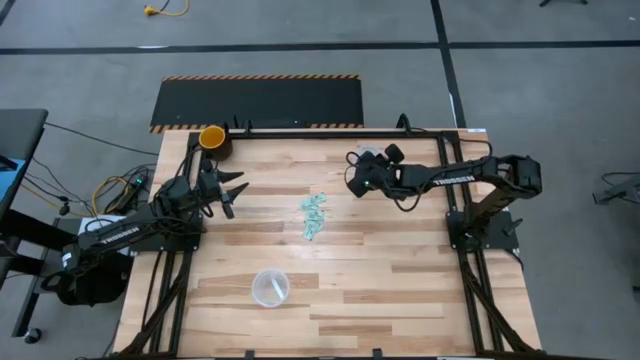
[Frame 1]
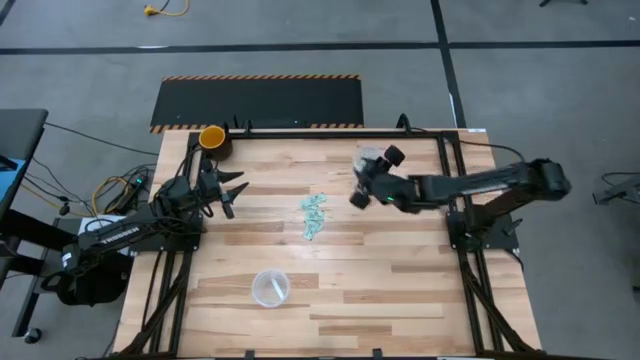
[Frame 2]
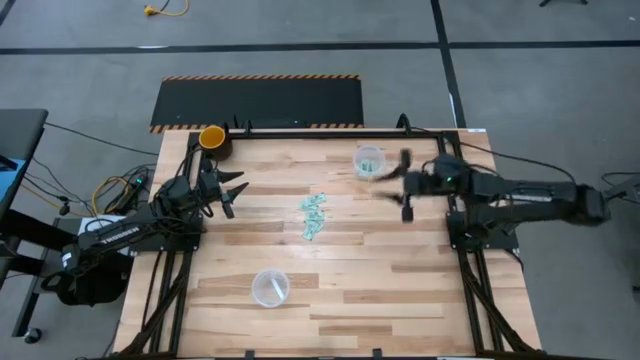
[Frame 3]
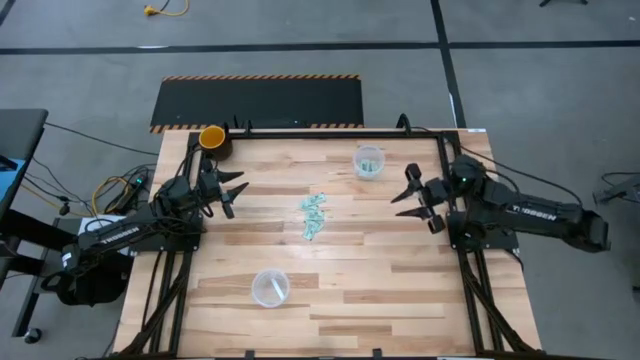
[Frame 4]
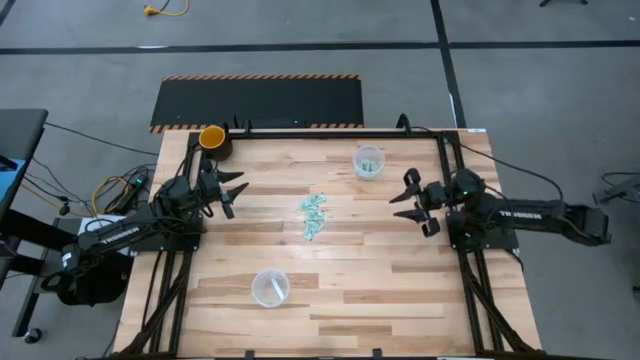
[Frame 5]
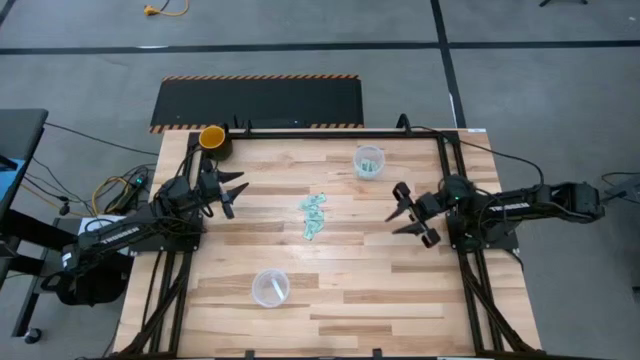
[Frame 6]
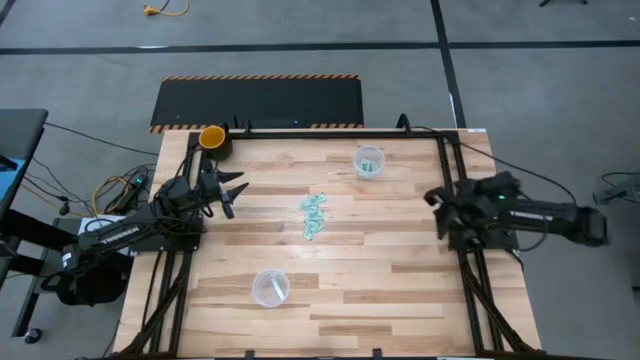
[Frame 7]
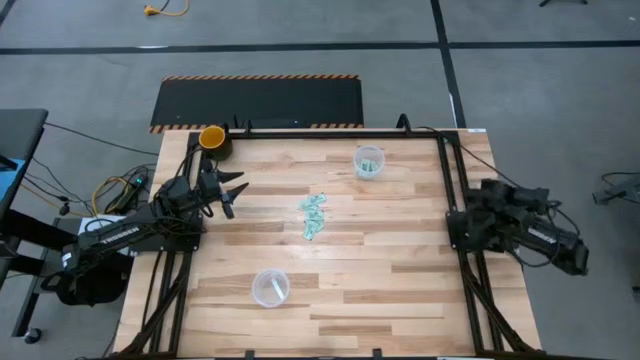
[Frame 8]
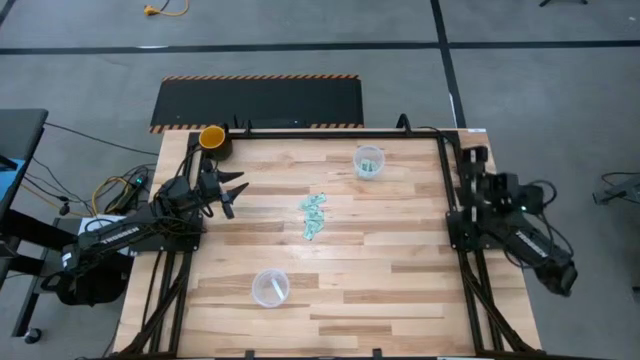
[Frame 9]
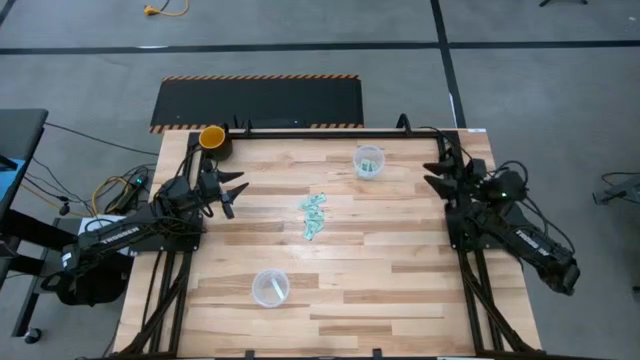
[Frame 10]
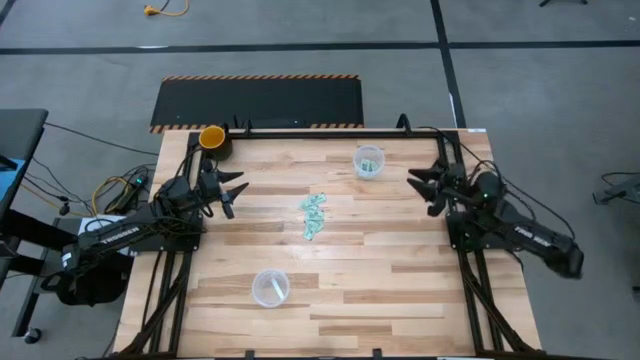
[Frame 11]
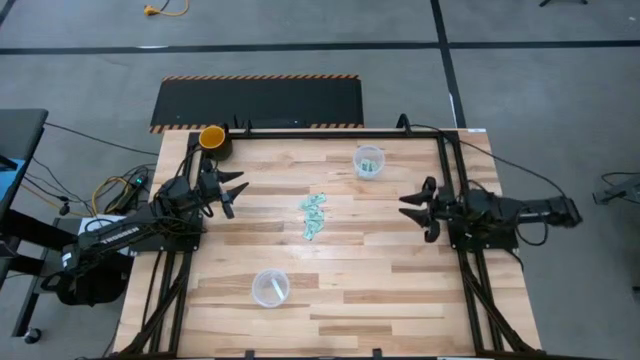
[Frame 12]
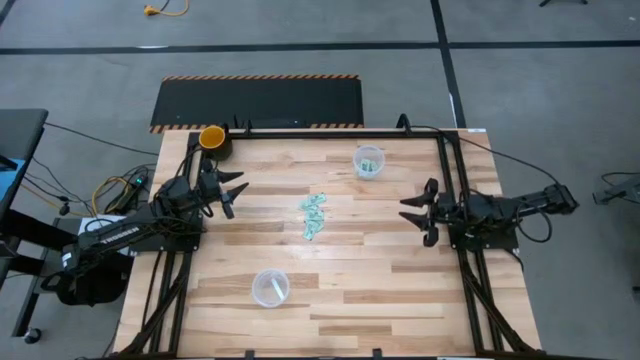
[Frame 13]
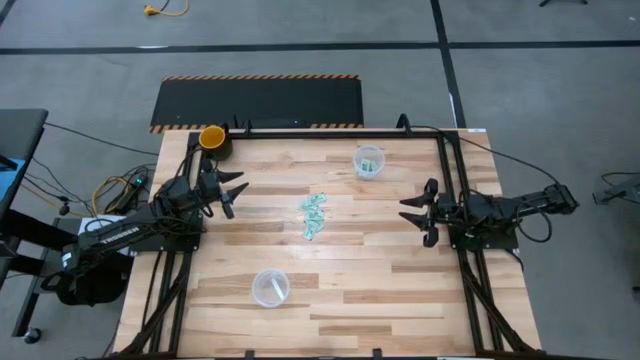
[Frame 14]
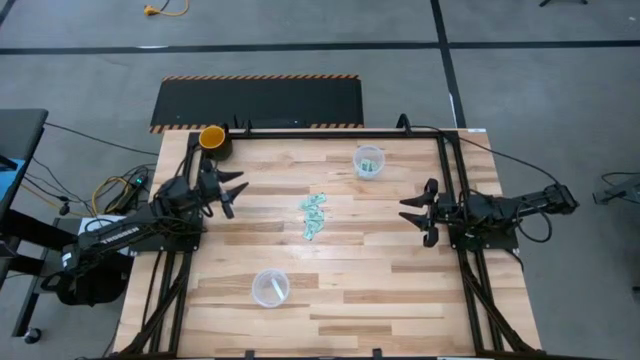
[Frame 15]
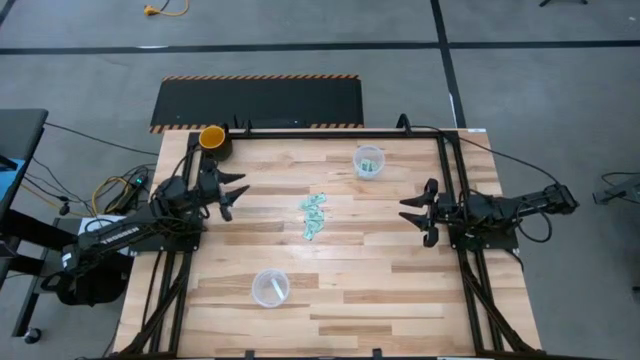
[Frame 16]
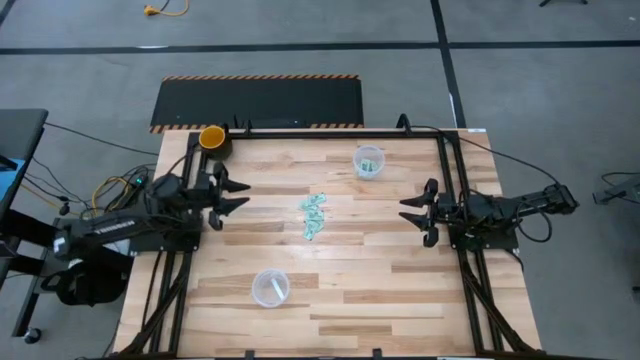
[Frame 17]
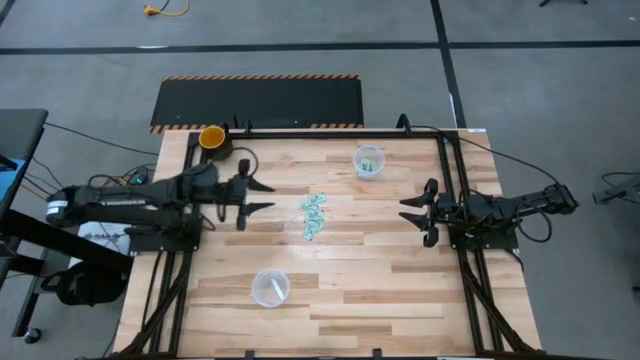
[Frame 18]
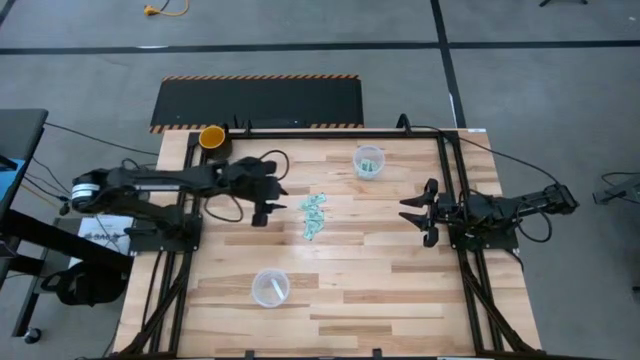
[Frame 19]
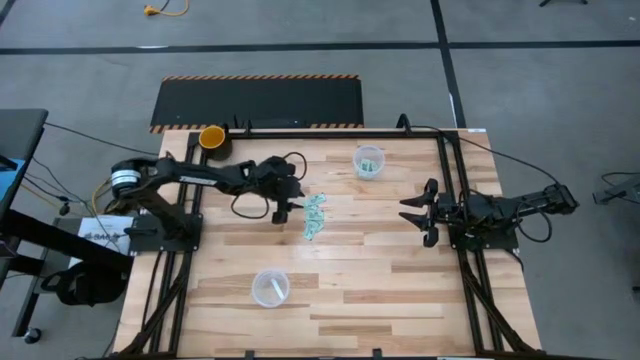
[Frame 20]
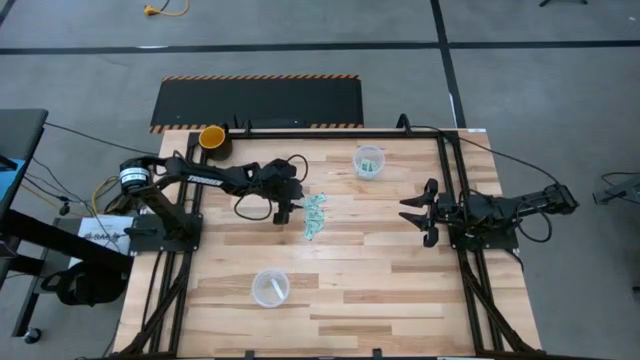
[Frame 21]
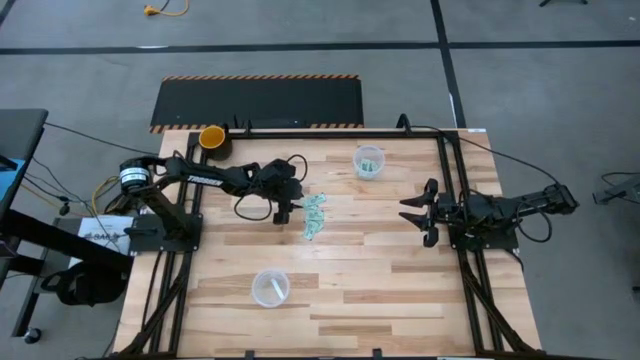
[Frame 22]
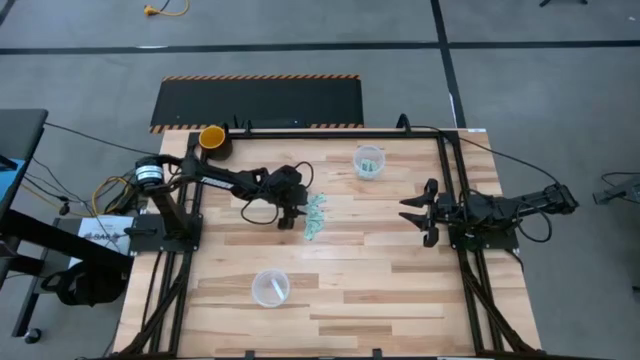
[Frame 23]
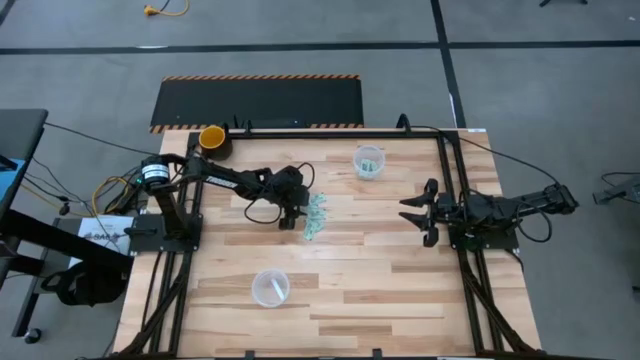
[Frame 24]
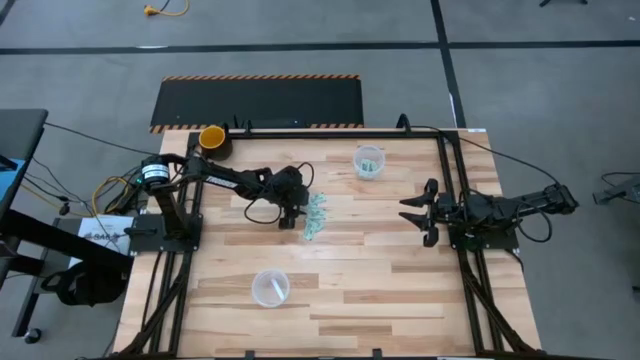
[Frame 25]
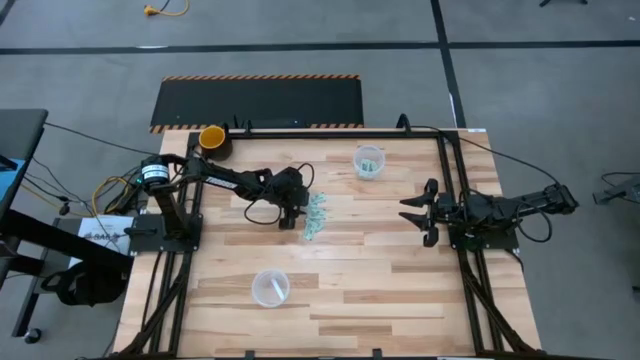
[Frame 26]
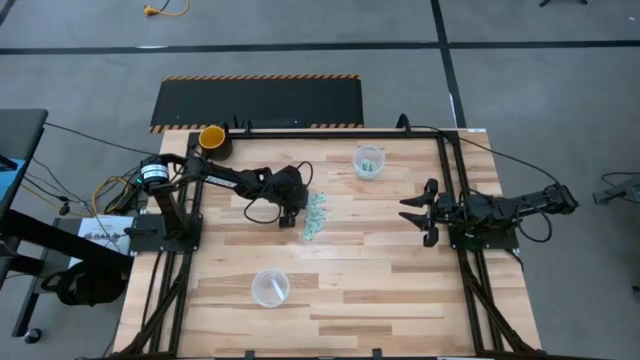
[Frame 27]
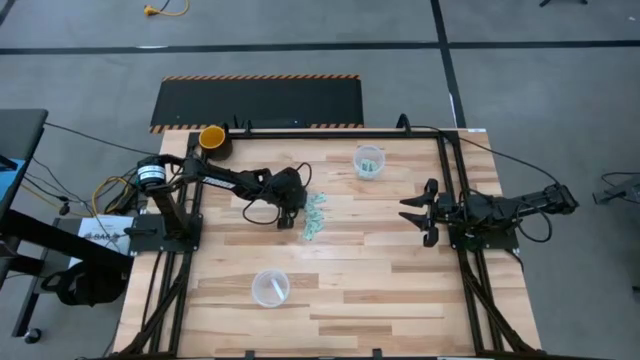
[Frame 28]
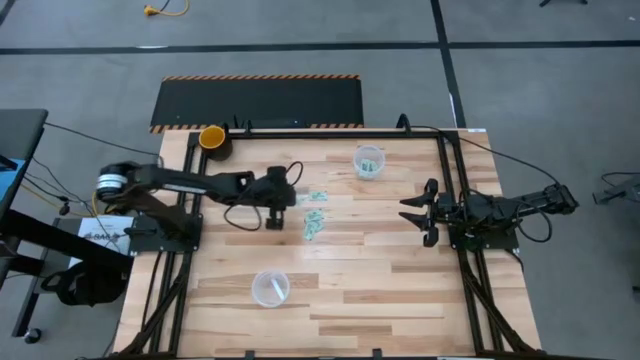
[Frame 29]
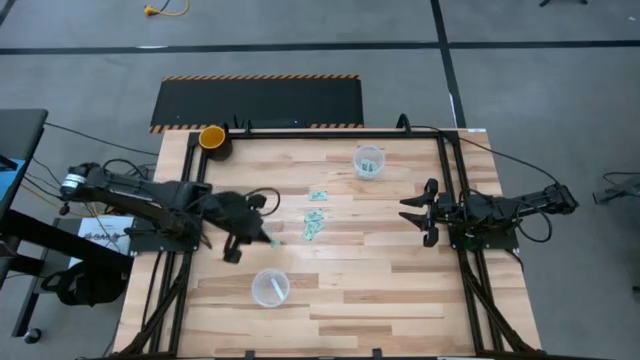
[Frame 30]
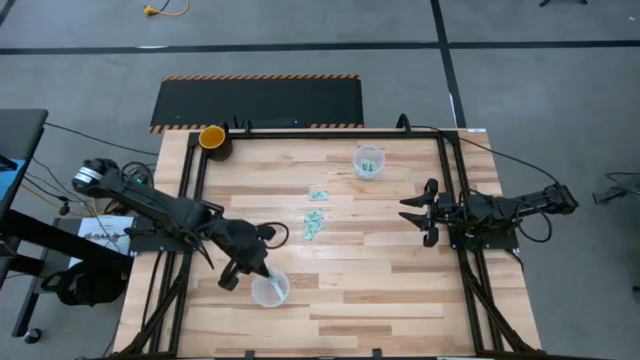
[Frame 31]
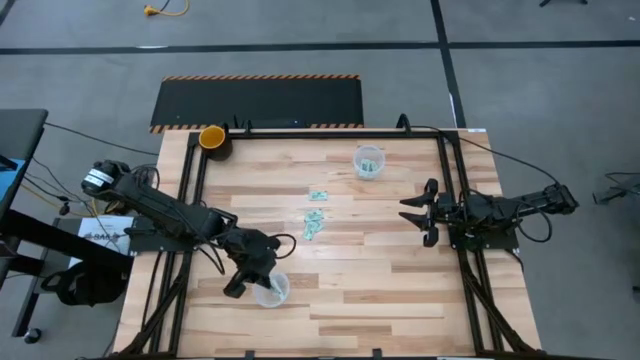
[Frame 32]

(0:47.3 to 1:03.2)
Task: Pick and place Stevia / Truvia into bins
Put the stevia packet into the bottom container

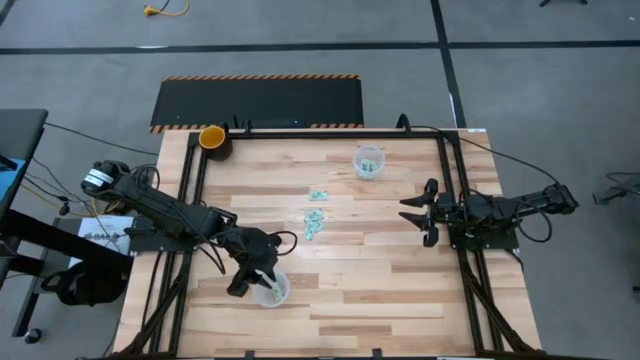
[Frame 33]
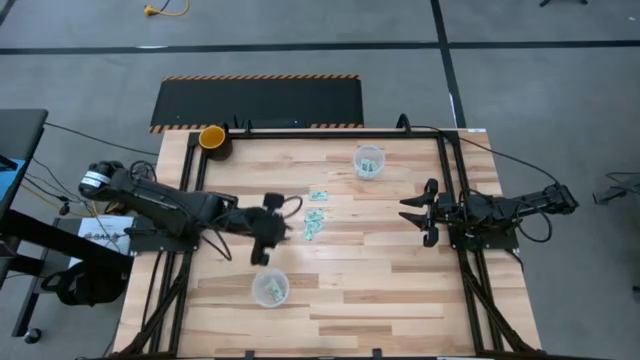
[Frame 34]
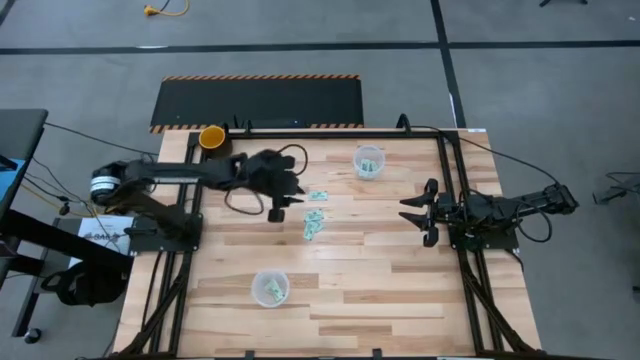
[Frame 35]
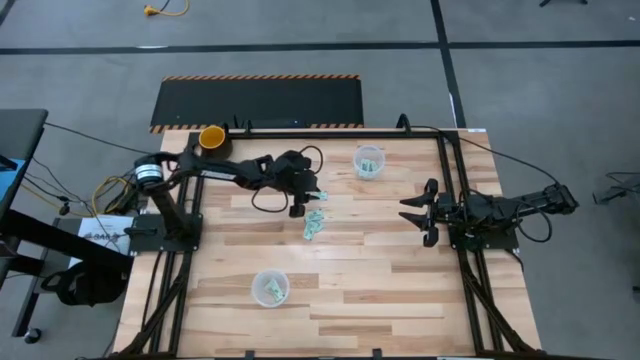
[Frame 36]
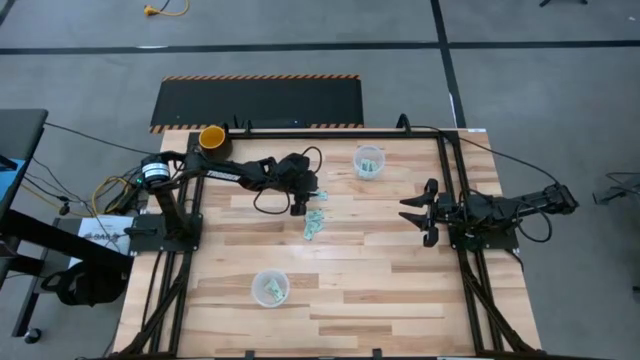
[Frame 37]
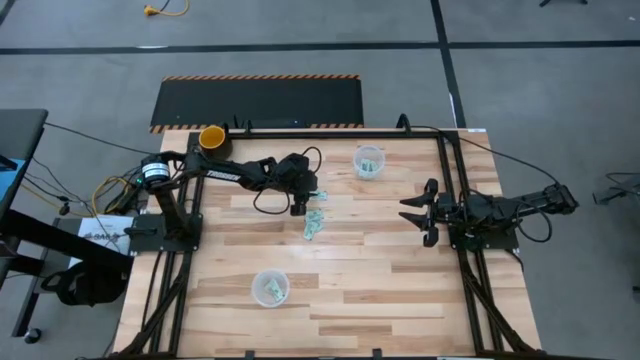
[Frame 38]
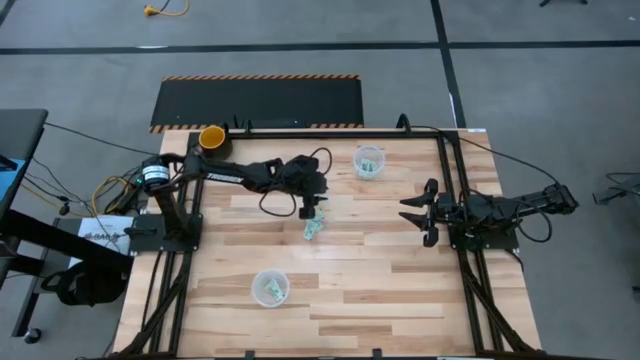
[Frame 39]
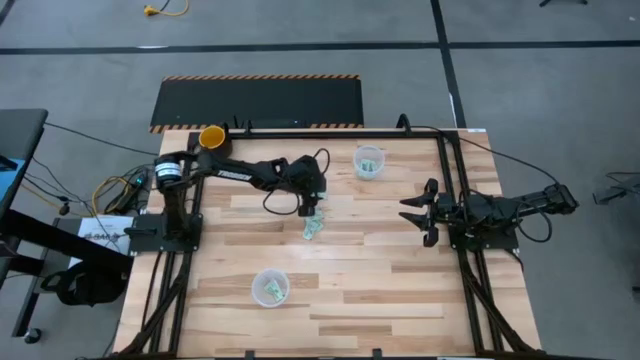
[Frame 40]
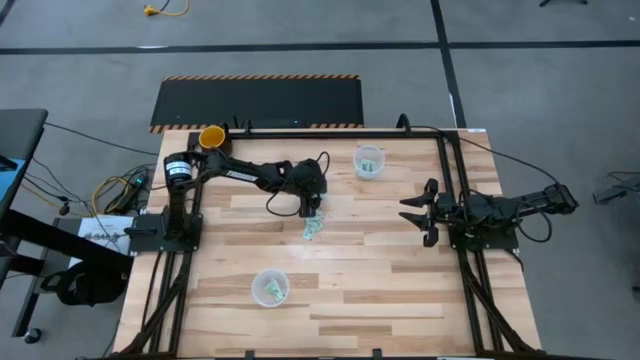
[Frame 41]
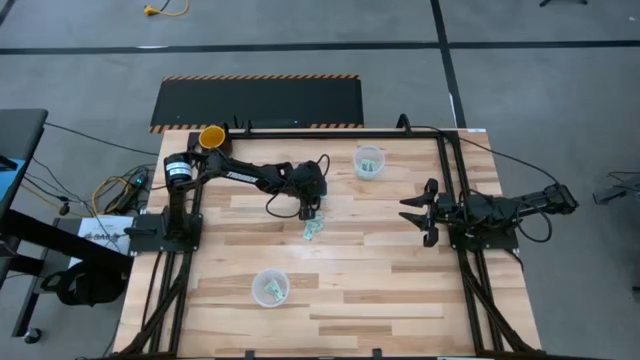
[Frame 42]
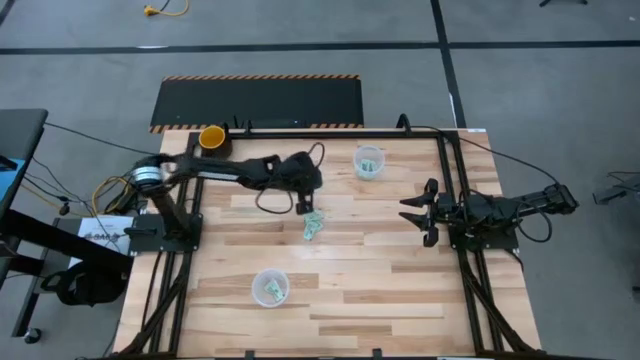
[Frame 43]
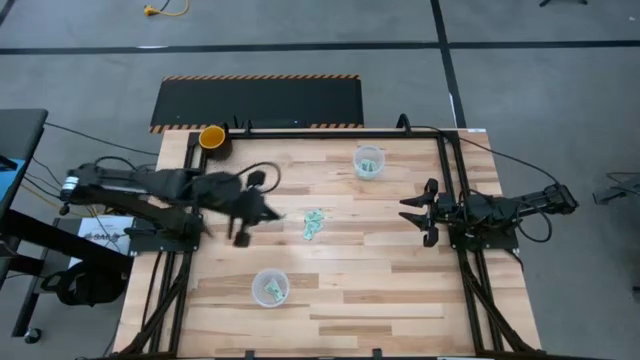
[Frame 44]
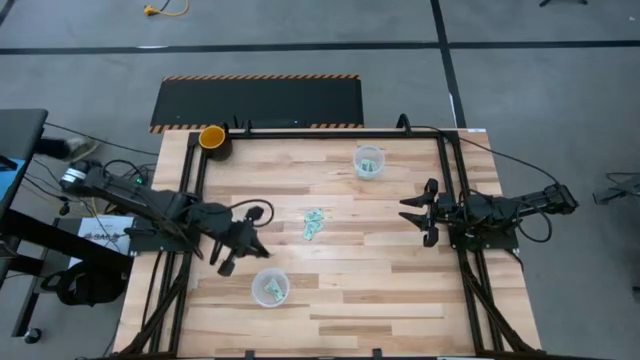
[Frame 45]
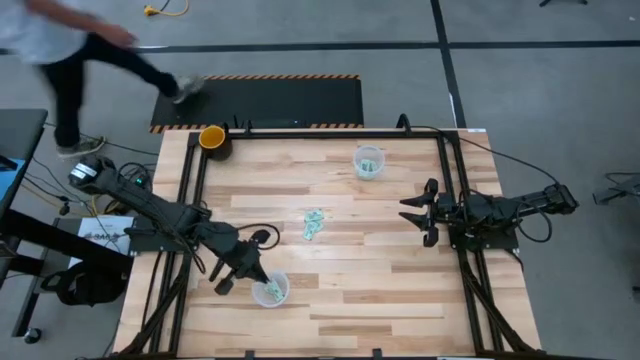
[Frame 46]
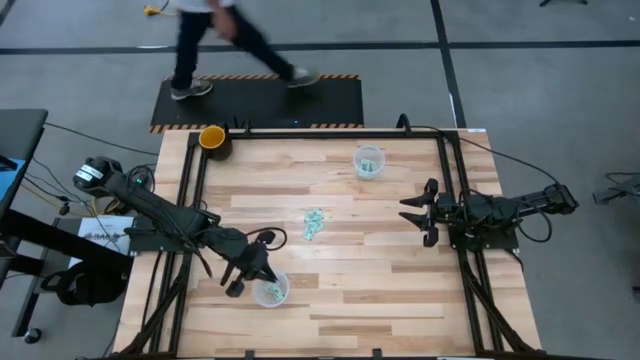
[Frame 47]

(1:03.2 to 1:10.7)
Put the stevia packet into the bottom container
